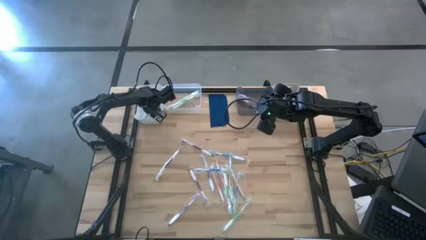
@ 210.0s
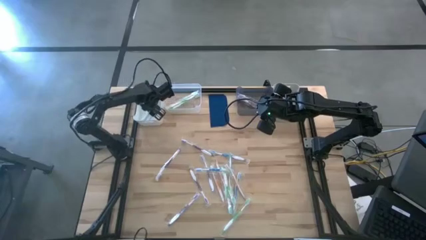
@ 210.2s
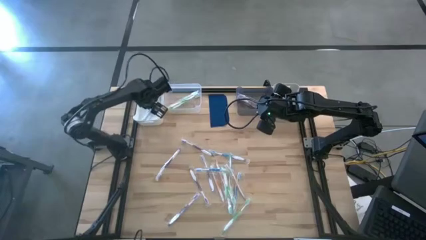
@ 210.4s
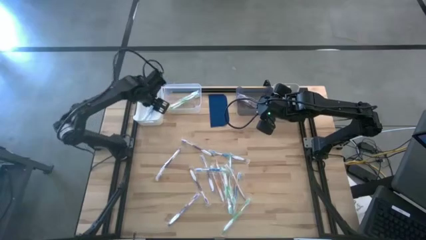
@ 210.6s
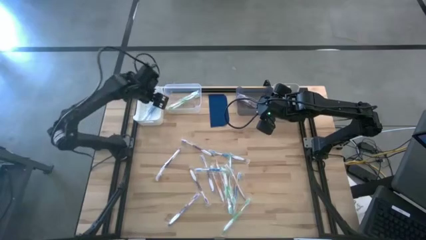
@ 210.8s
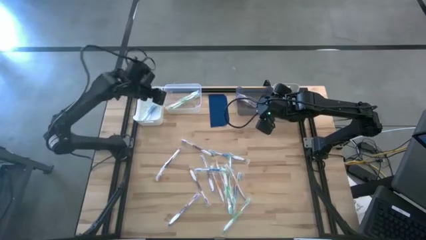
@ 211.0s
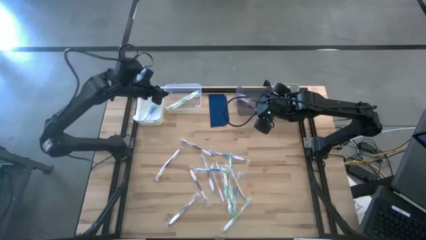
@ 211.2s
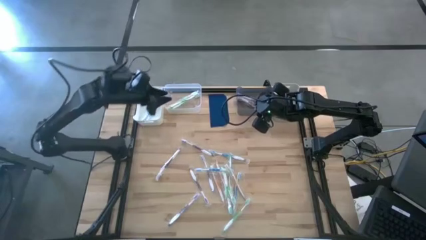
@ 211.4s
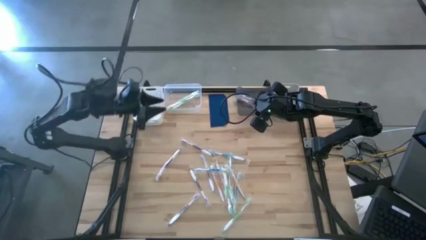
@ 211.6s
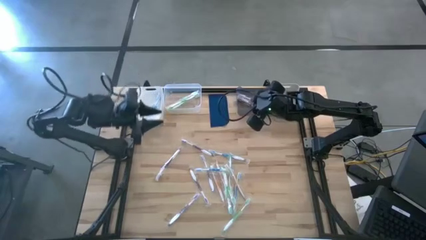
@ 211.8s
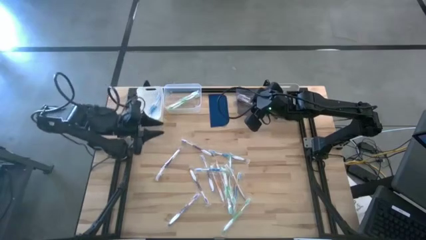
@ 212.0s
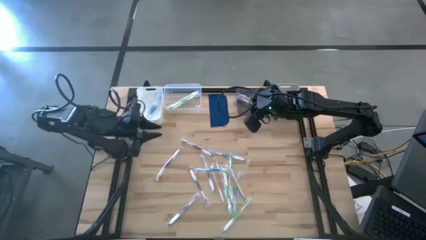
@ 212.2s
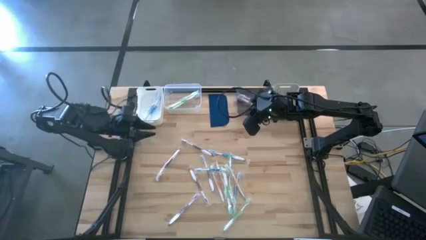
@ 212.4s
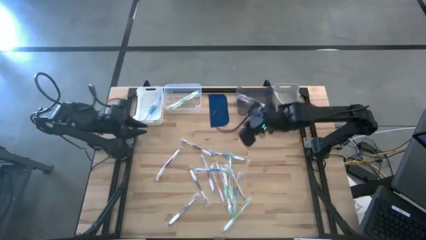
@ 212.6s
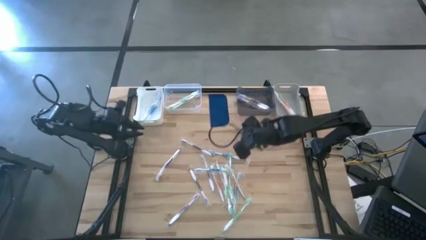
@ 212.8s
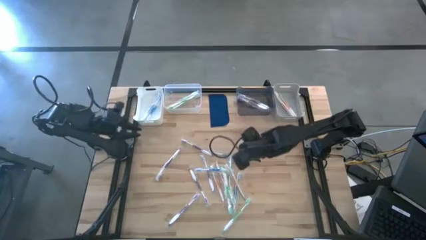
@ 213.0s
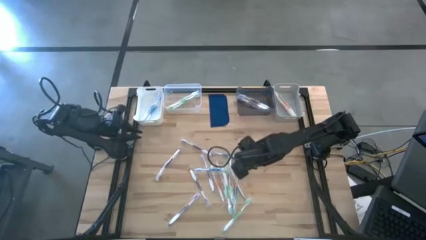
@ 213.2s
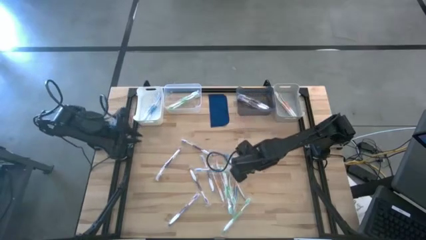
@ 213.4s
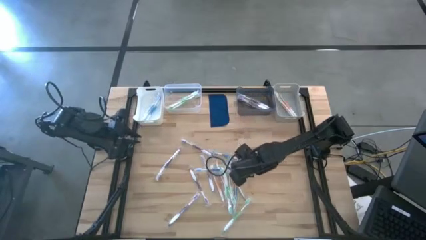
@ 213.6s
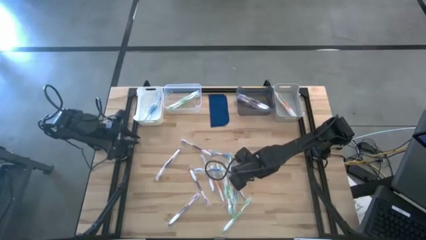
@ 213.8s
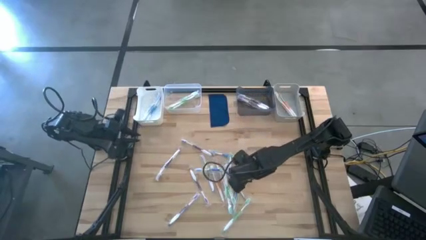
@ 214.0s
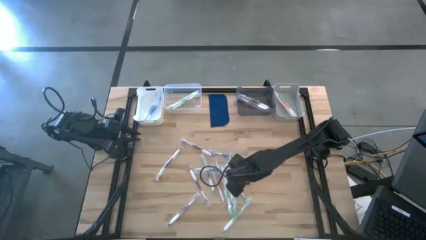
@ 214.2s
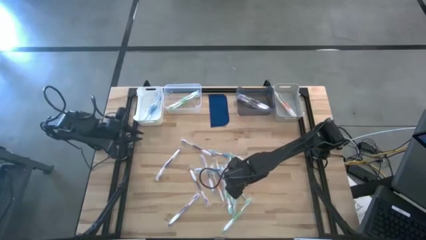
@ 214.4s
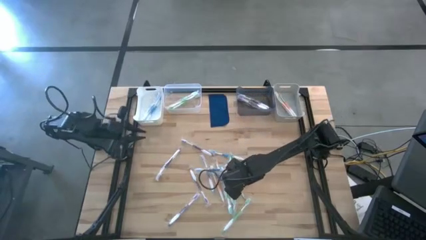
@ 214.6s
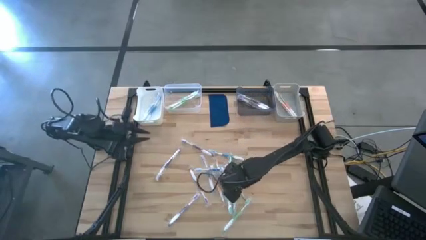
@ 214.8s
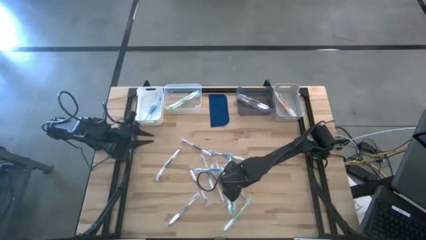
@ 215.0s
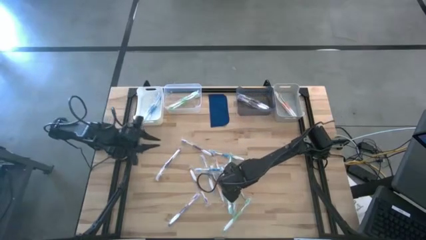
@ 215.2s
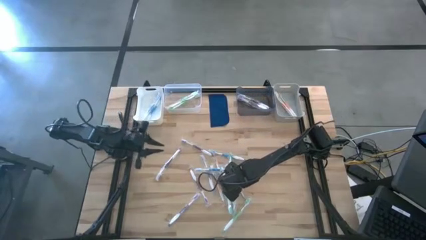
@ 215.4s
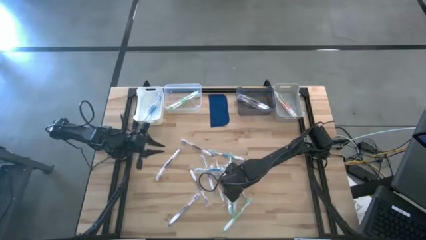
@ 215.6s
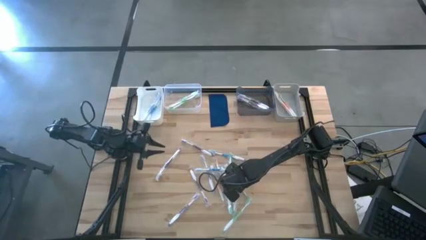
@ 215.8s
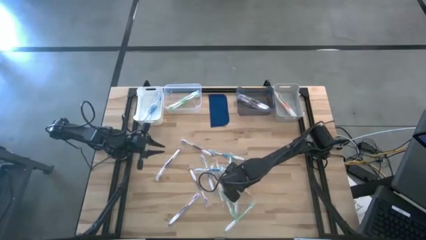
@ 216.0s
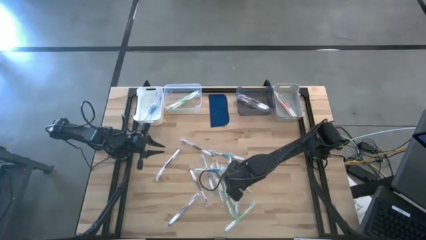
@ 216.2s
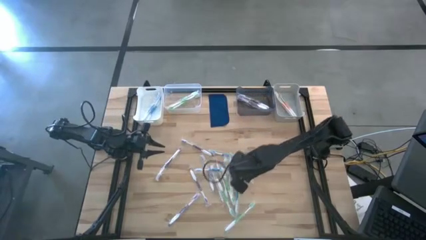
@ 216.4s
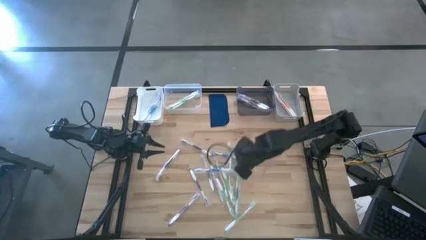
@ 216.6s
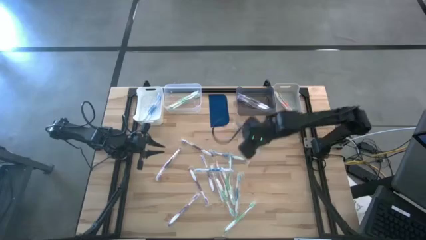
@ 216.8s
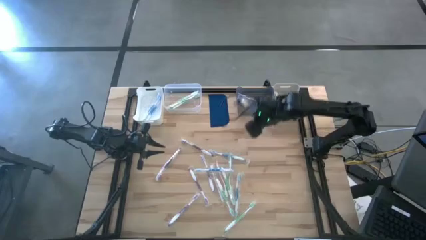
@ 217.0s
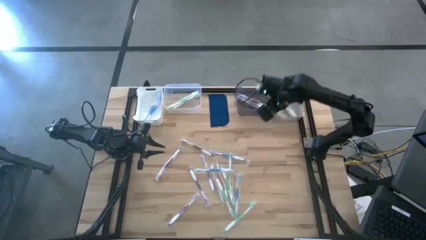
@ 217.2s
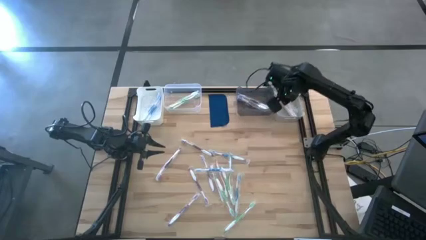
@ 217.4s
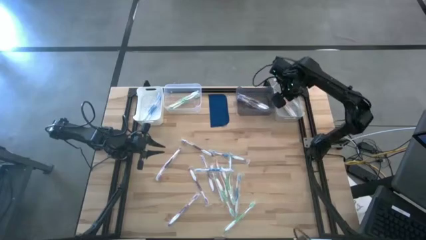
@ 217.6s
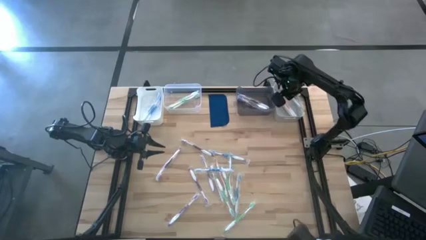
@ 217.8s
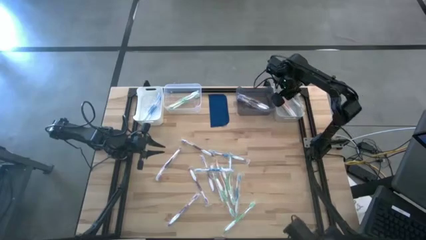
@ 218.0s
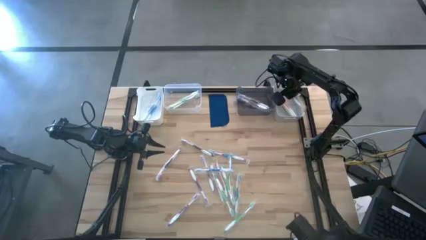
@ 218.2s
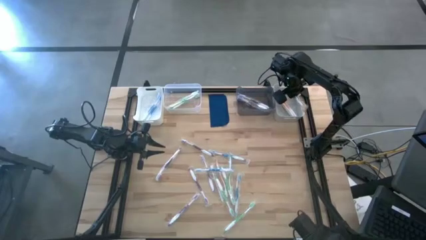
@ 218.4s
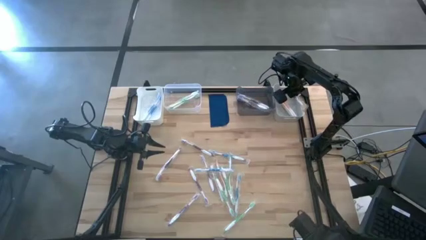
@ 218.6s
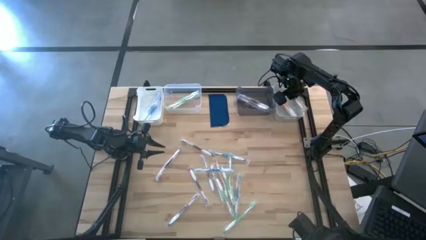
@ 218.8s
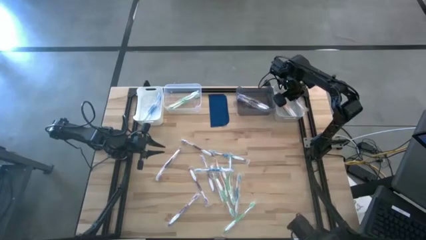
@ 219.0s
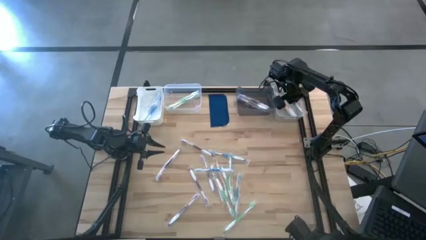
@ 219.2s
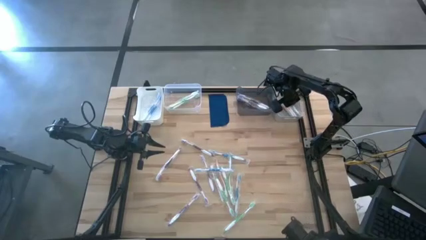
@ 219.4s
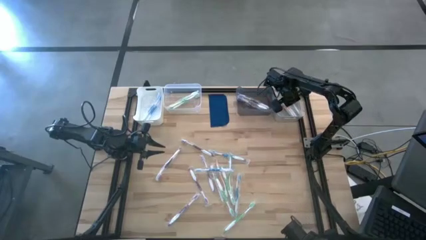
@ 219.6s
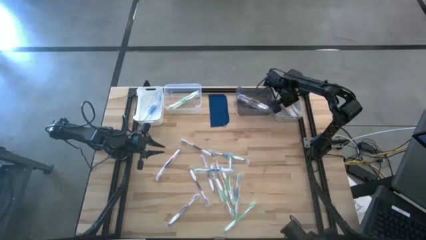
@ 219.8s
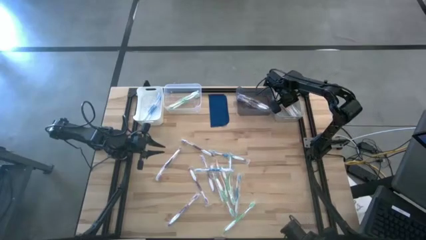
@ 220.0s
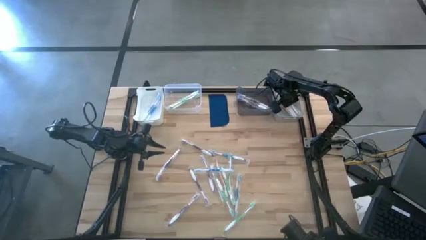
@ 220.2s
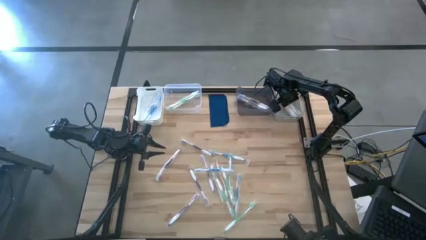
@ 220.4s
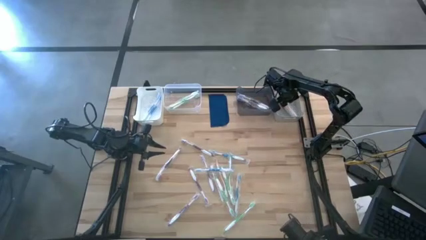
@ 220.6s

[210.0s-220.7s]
Task: Pick & Place Toothbrushes
Put the orange toothbrush into the gray bin

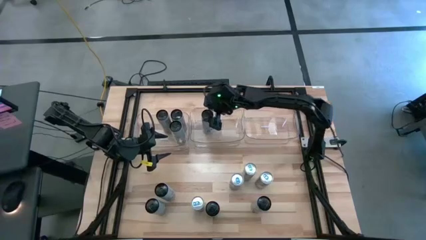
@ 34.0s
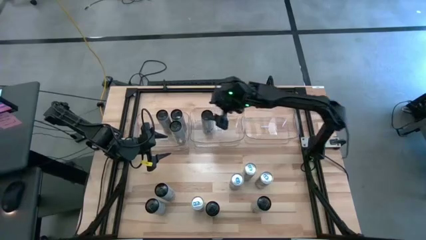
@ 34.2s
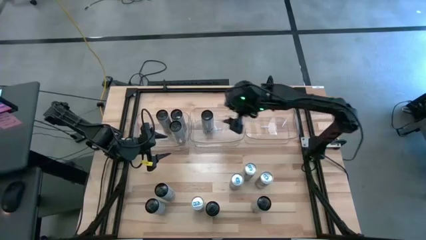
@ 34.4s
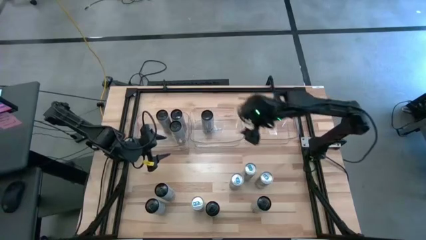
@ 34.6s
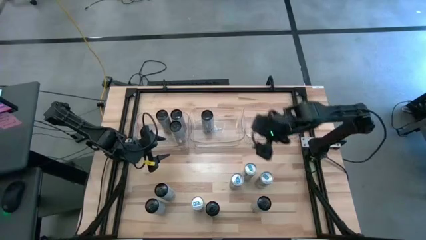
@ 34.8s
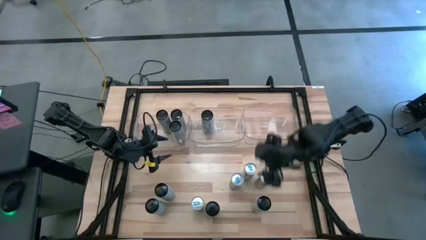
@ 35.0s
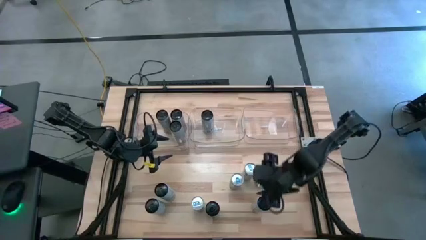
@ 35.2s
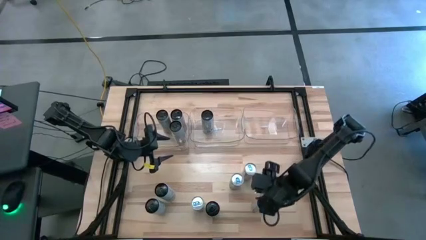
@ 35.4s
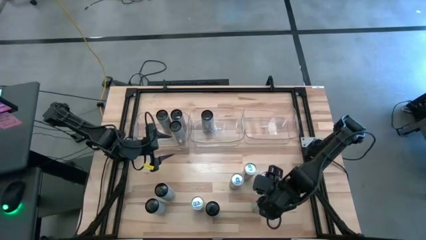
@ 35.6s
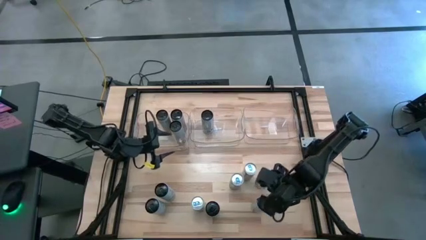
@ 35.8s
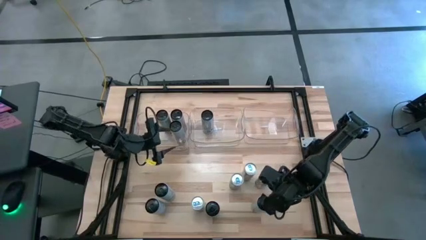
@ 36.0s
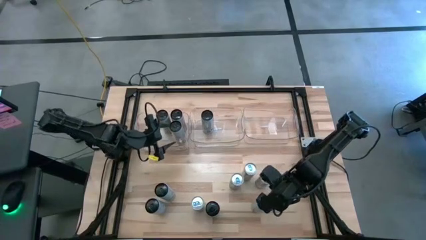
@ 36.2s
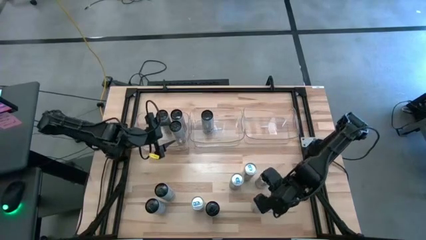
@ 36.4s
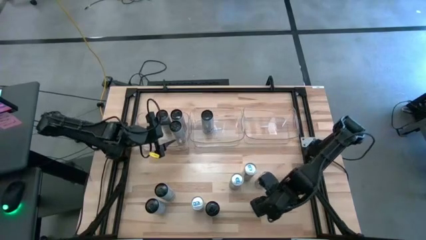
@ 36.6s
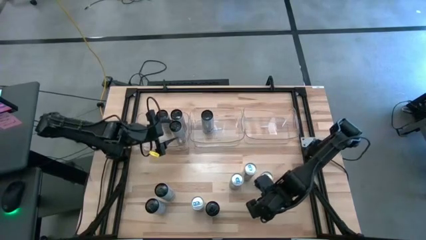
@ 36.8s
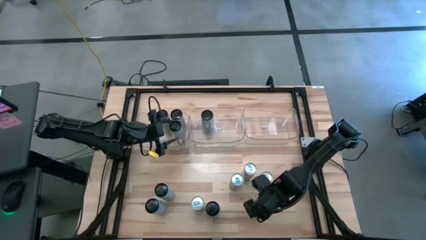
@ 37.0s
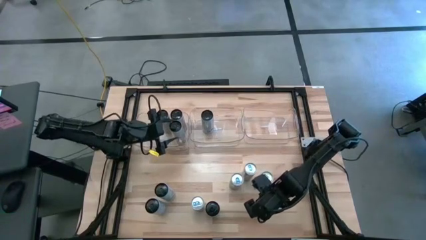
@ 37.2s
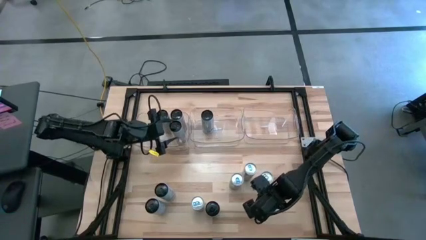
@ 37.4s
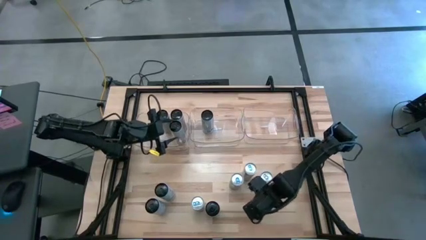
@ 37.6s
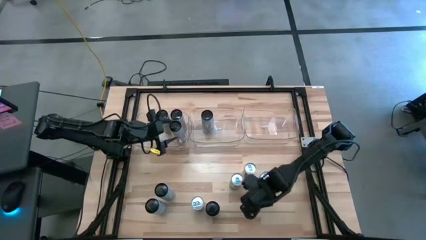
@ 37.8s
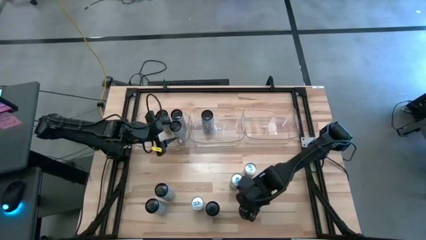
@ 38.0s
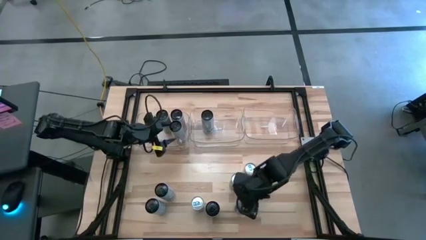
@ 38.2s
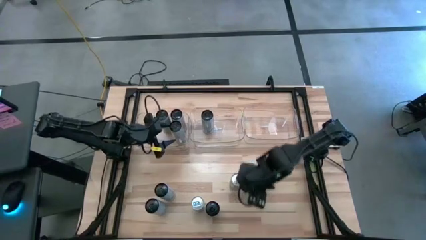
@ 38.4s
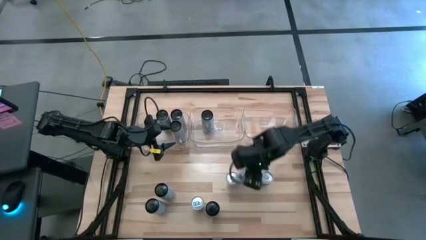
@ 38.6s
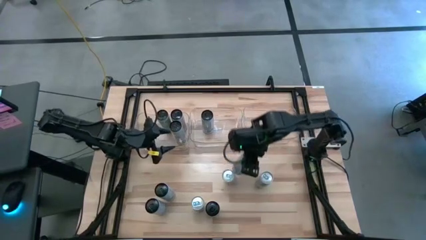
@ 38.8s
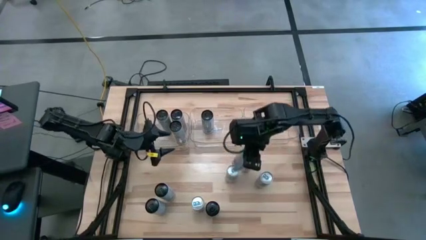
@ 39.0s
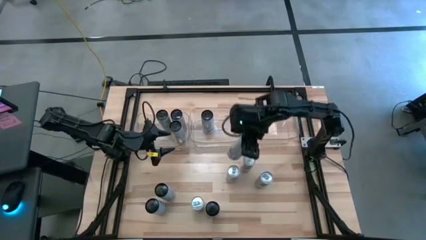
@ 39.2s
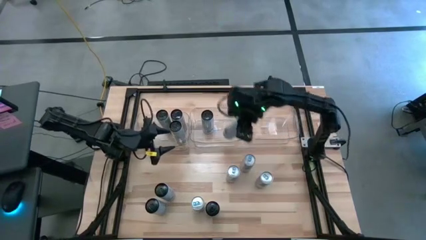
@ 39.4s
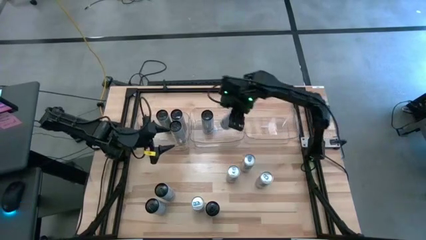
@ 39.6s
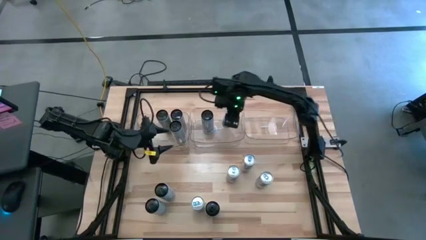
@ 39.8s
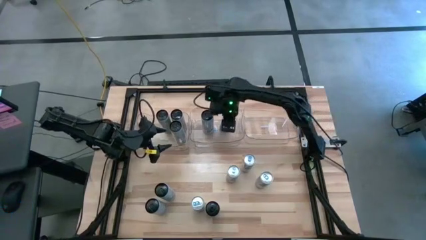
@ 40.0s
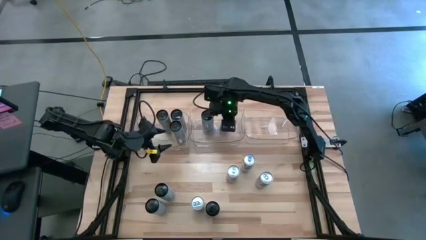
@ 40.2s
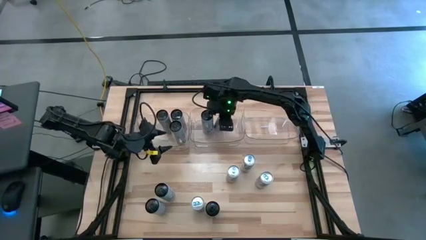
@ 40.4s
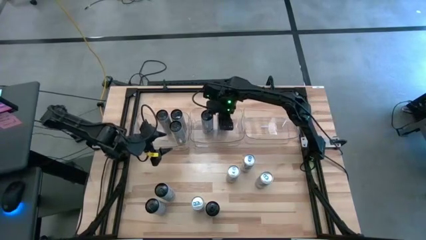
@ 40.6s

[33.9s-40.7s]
Task: Sort soda cans
Put the blue soda can into the center transparent bin
